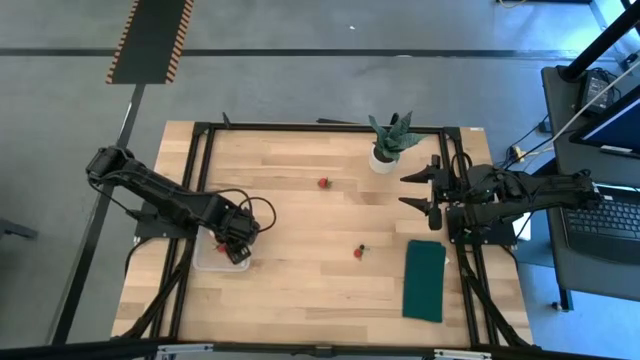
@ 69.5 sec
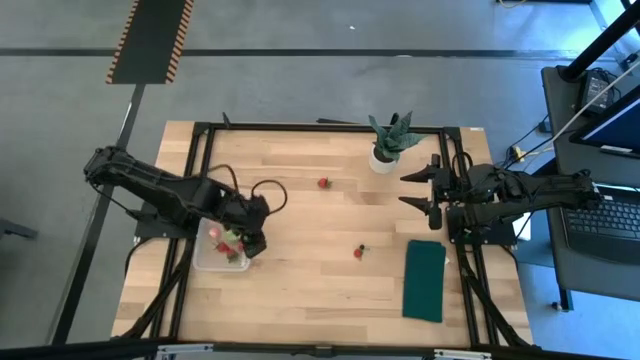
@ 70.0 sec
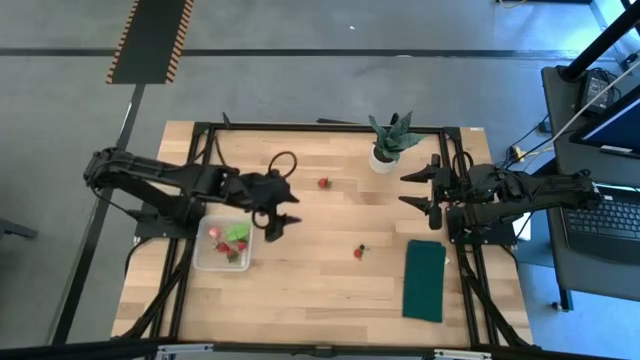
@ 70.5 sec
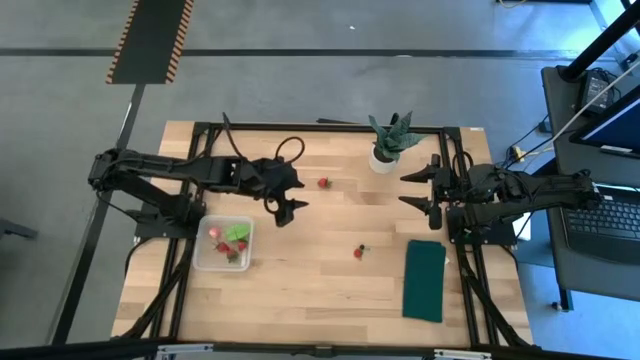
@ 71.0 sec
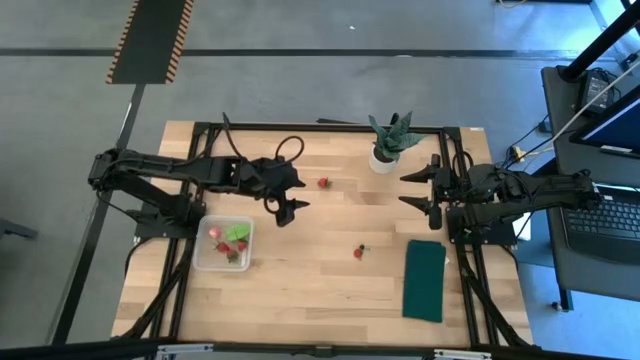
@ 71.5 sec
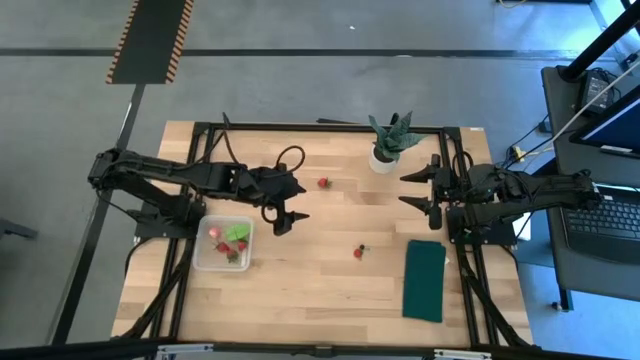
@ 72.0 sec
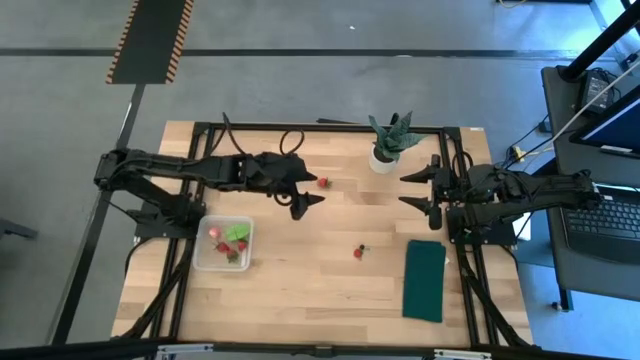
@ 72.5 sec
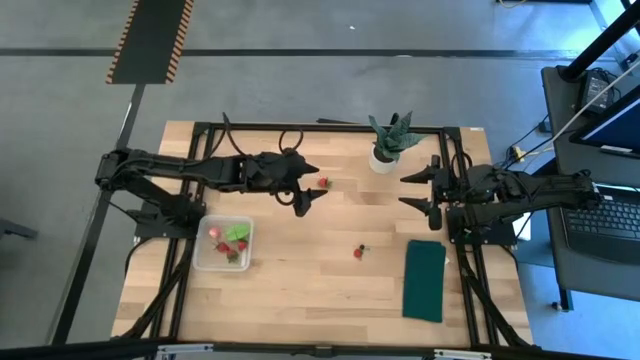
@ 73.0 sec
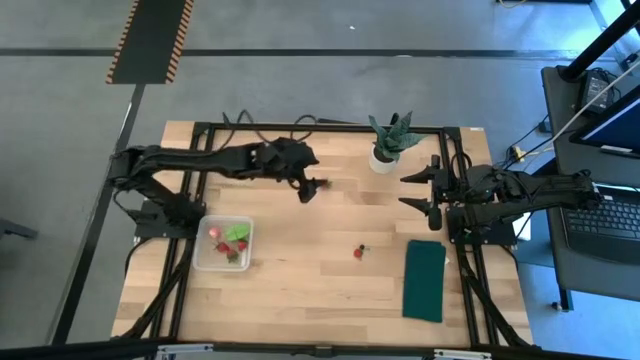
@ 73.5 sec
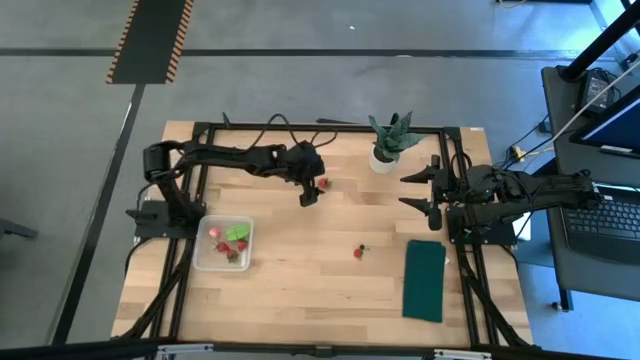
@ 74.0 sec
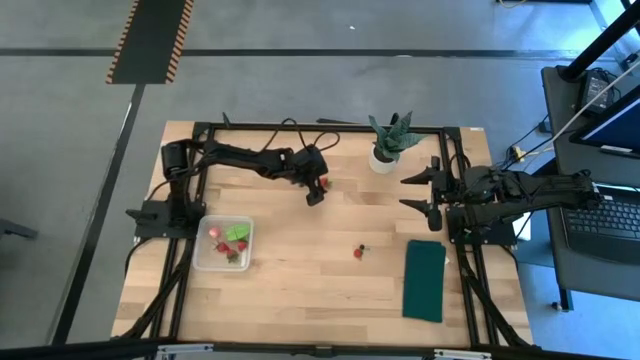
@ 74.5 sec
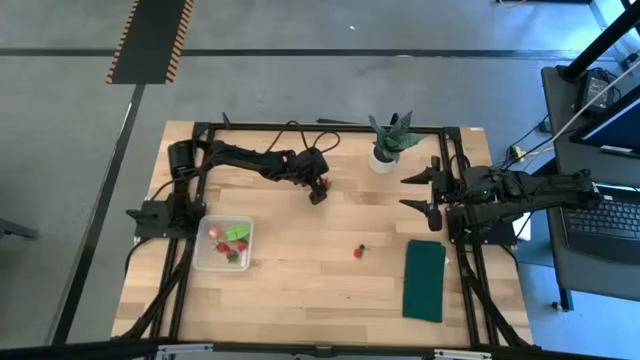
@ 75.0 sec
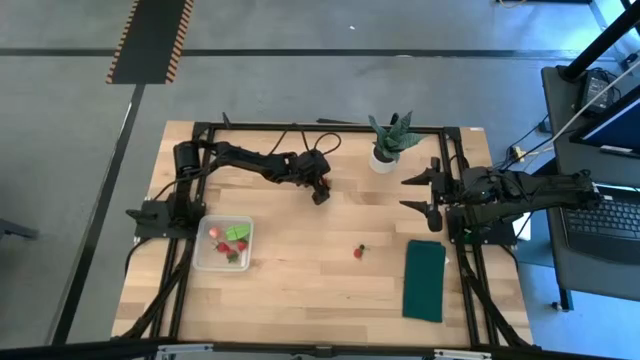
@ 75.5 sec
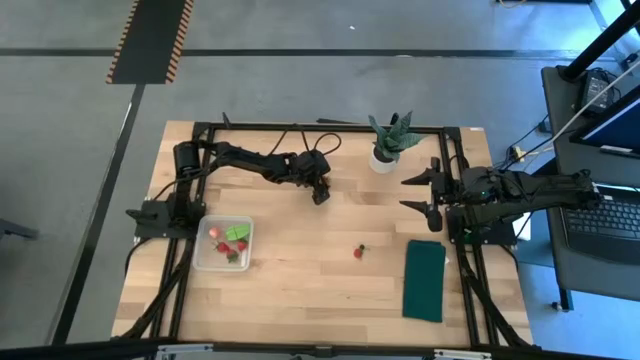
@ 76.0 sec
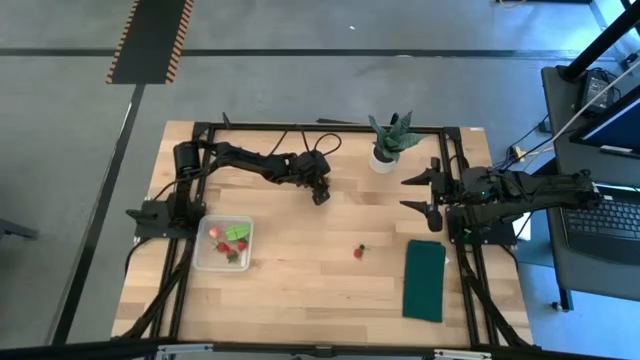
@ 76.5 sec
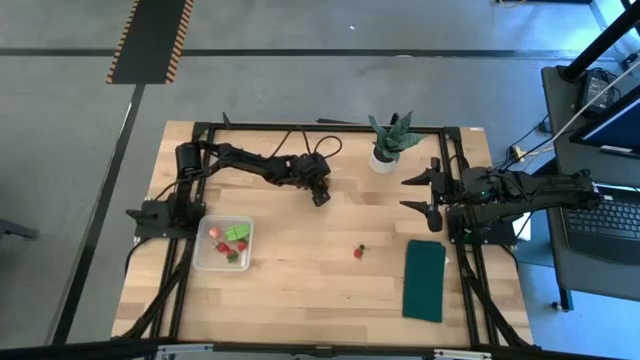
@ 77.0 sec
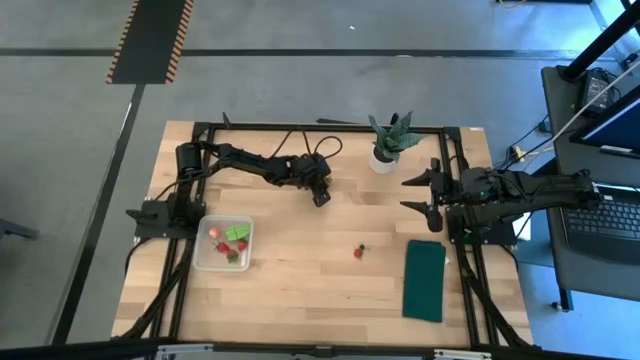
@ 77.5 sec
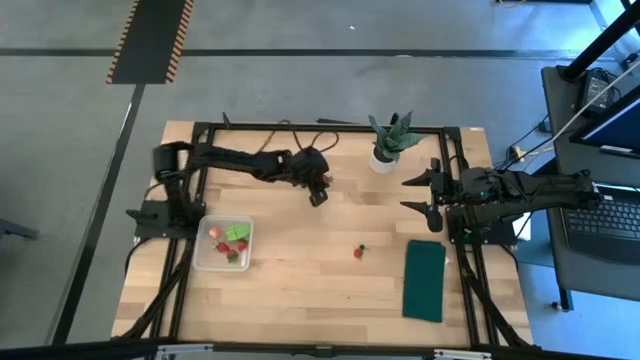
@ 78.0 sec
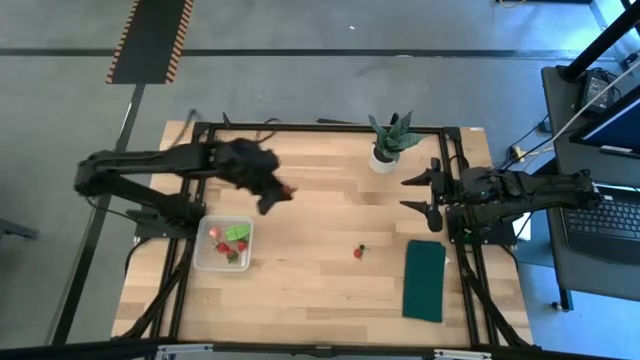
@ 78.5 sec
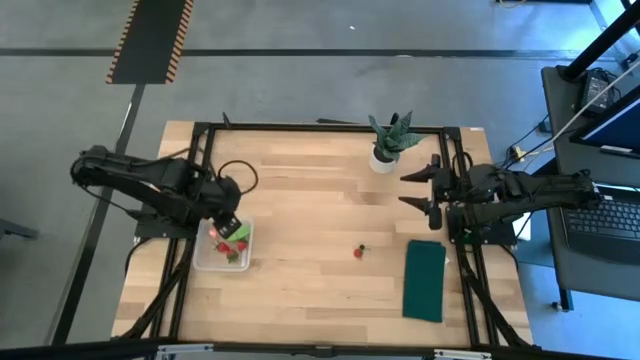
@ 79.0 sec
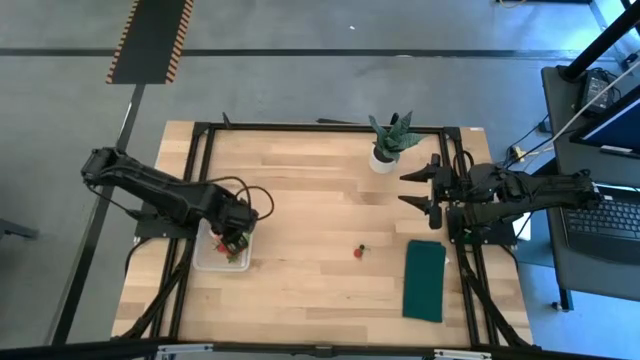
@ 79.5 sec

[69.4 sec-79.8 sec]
Task: Pick and placing Produce into tupperware
Put the red strawberry into the transparent bin

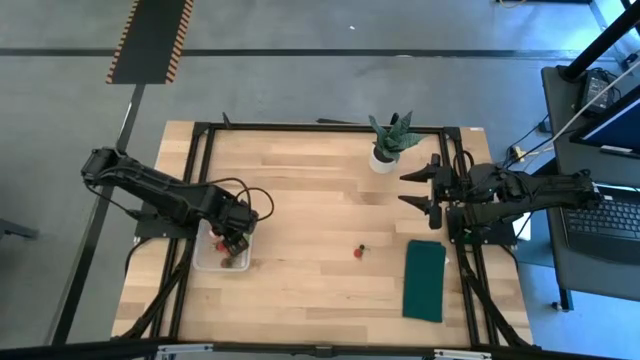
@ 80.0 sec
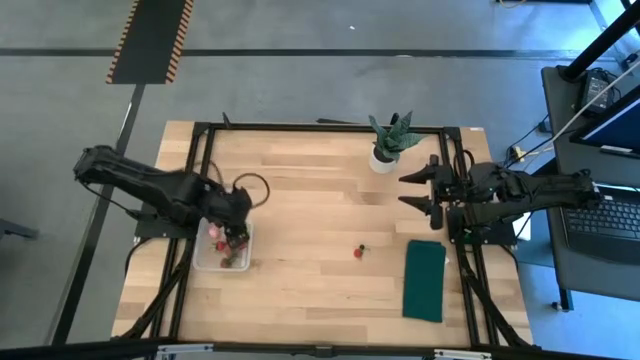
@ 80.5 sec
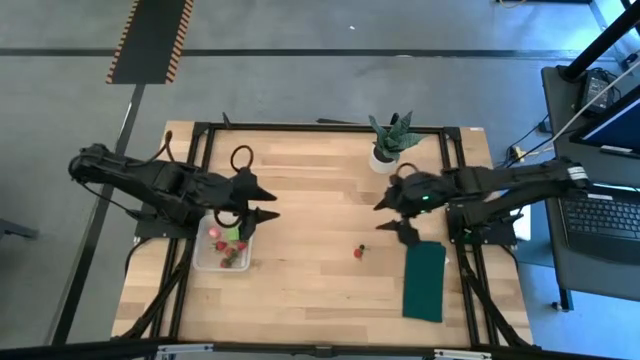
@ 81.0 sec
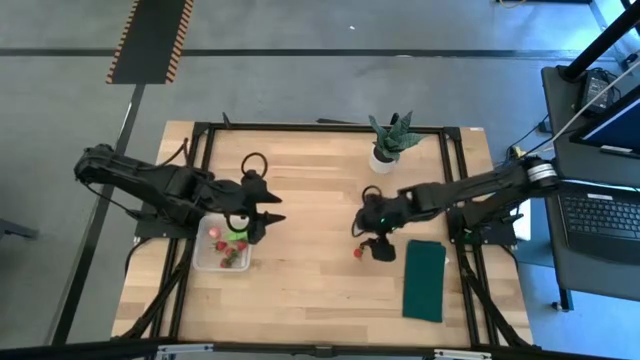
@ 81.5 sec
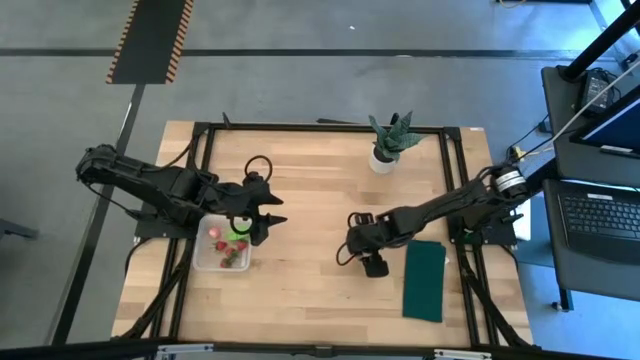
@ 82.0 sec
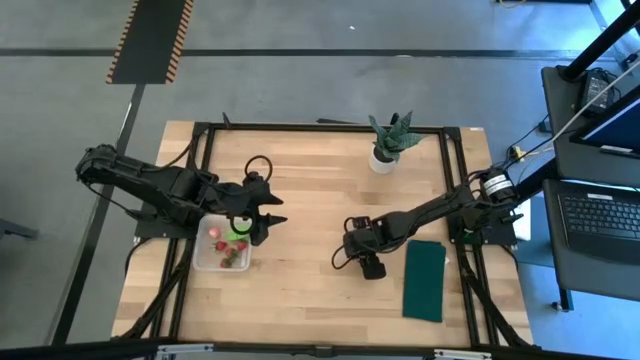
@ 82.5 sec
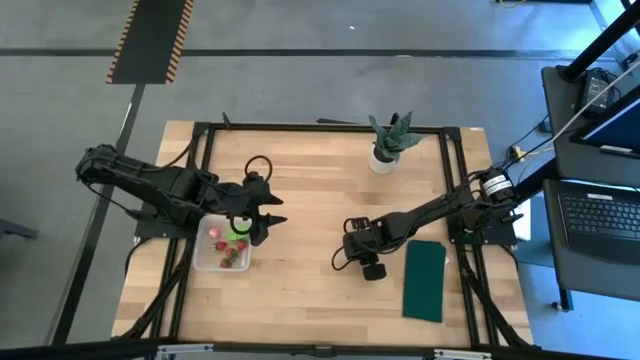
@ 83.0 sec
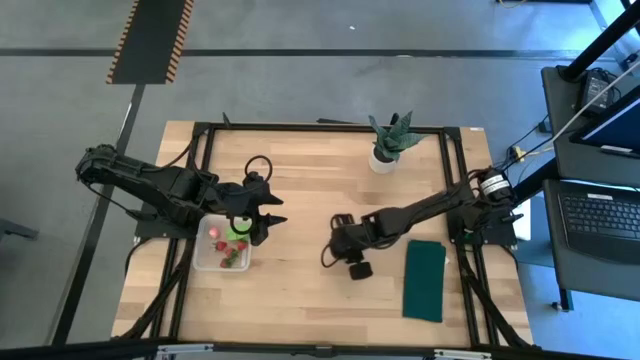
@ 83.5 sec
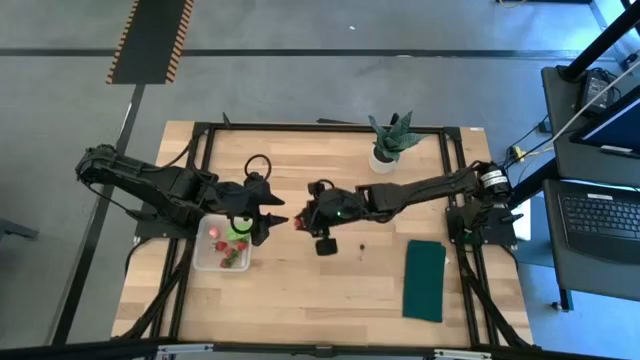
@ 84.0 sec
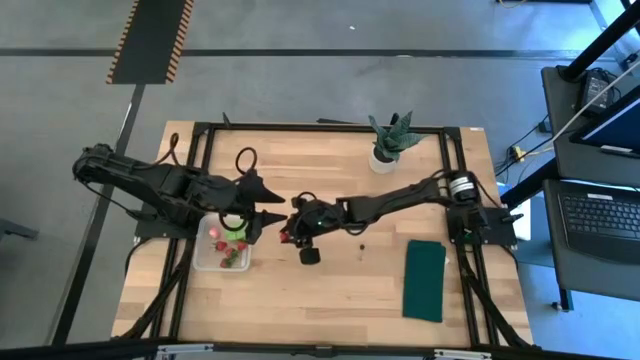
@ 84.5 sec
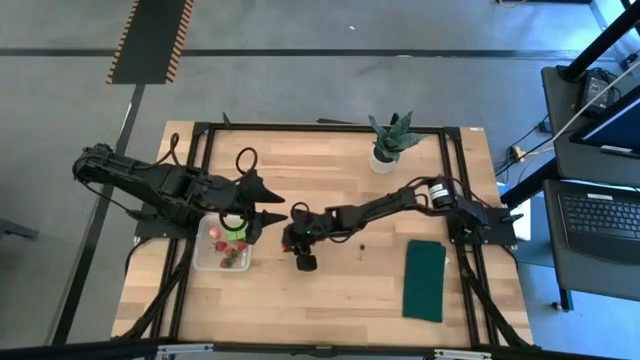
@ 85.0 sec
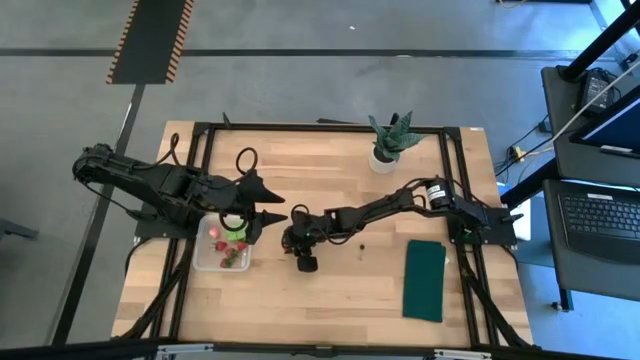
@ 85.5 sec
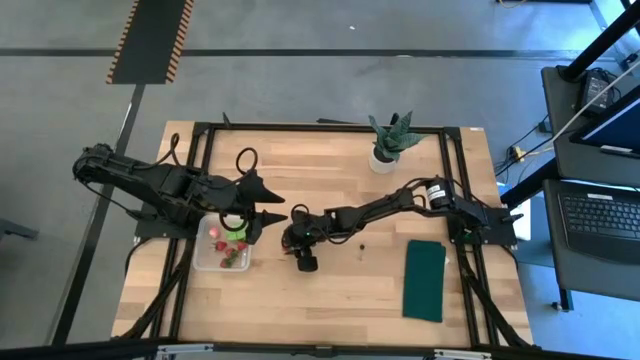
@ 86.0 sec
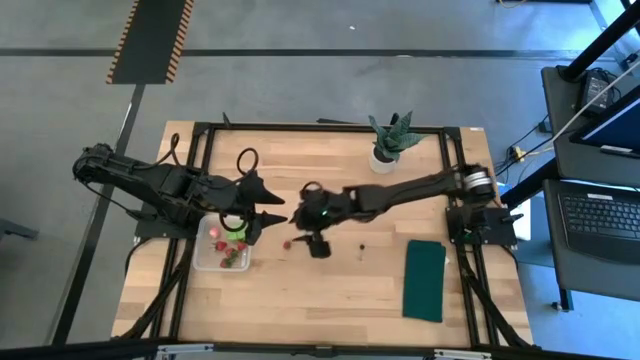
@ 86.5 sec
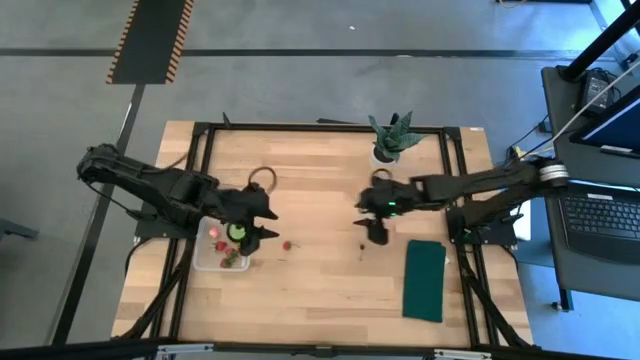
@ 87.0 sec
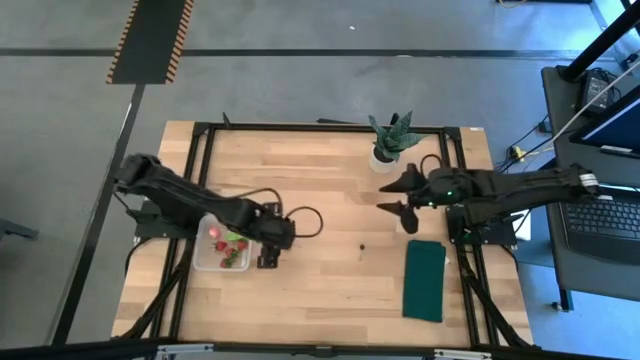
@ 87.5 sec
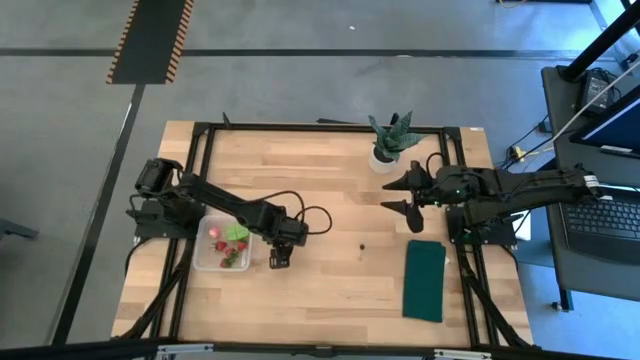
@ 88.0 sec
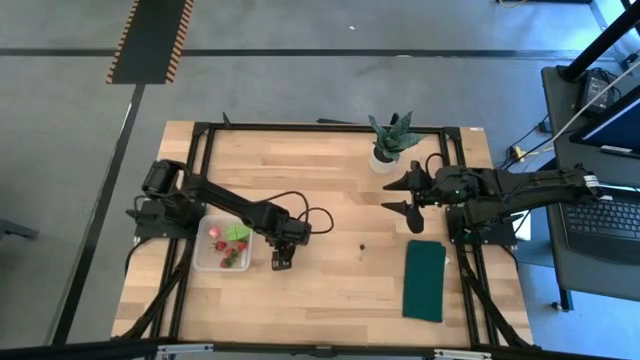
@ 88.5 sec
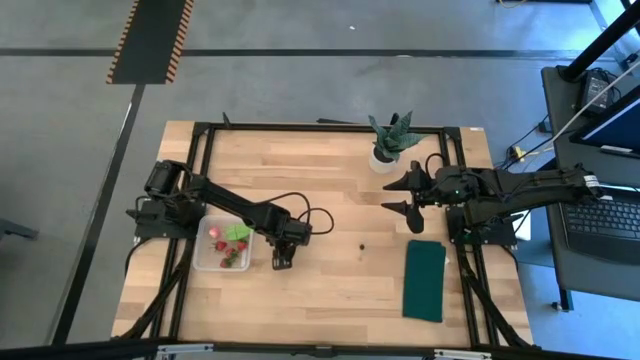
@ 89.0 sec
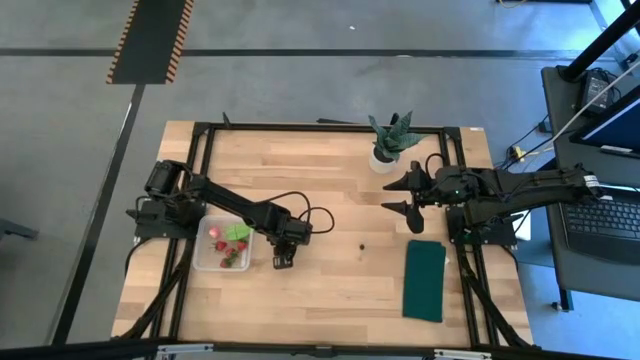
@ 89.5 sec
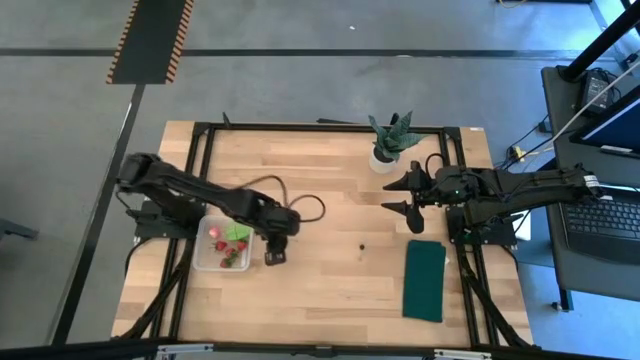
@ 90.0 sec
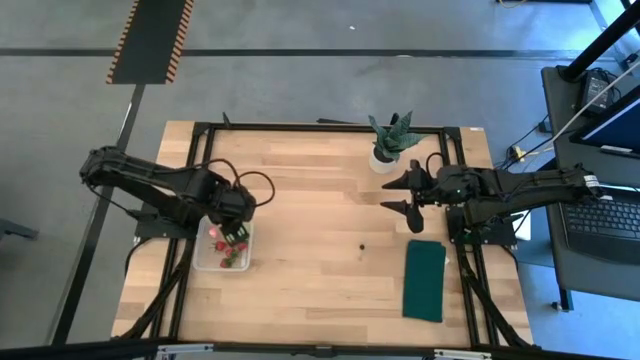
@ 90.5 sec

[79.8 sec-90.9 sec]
Put the red strawberry into the transparent bin
